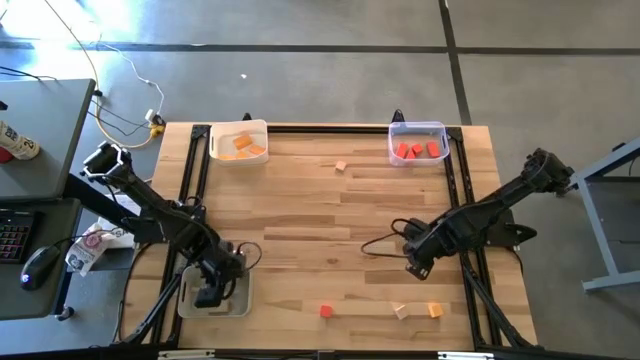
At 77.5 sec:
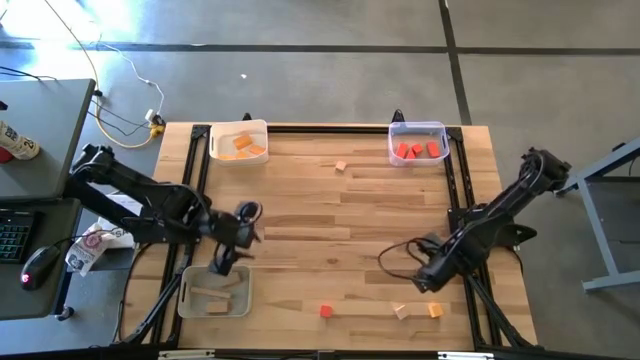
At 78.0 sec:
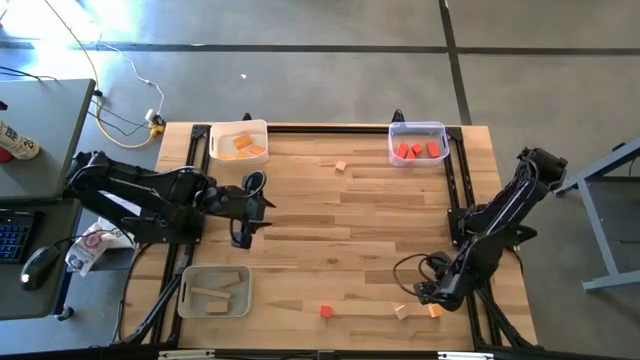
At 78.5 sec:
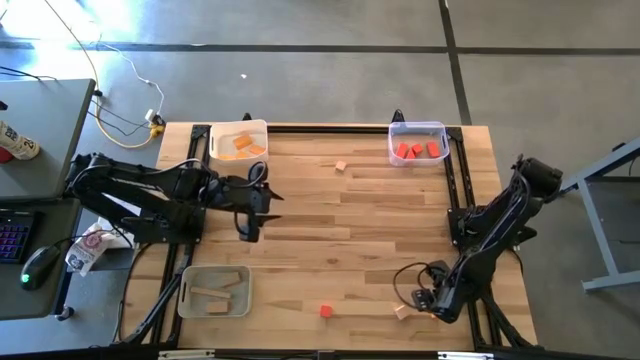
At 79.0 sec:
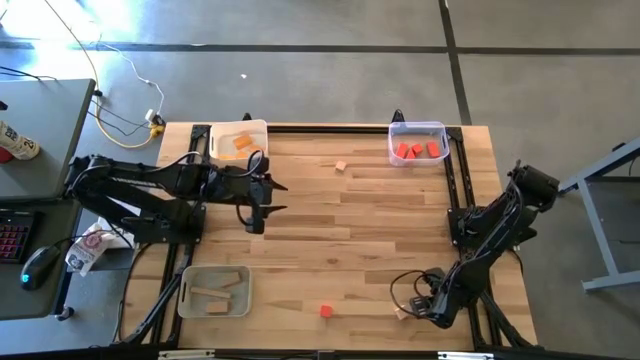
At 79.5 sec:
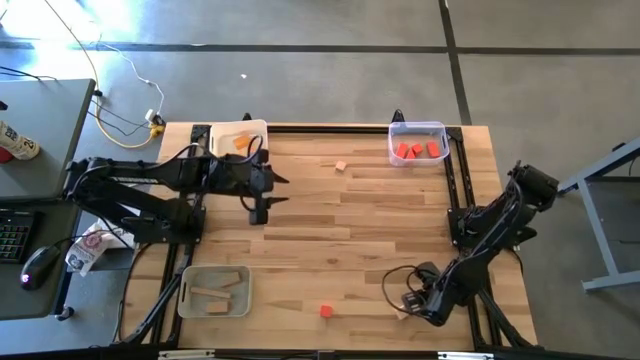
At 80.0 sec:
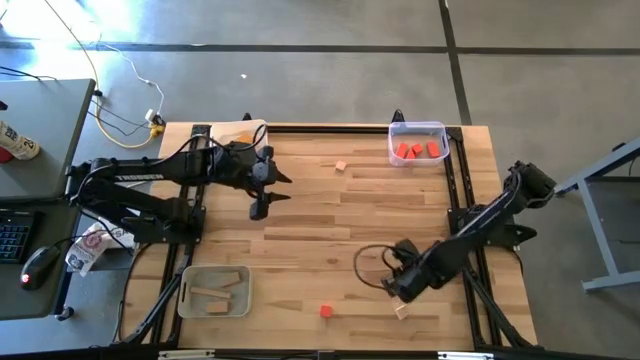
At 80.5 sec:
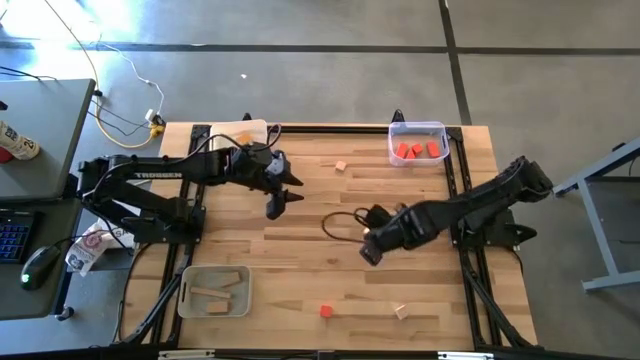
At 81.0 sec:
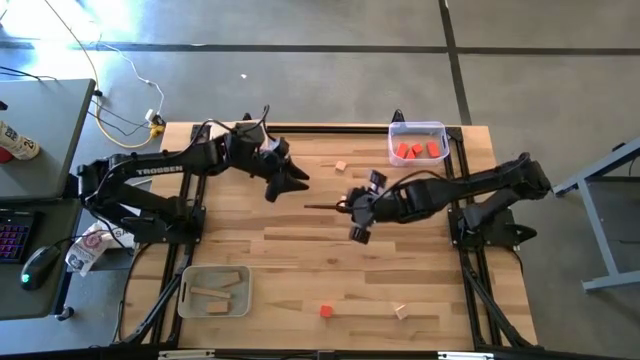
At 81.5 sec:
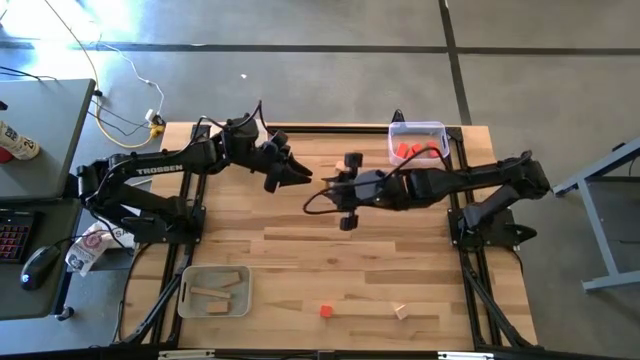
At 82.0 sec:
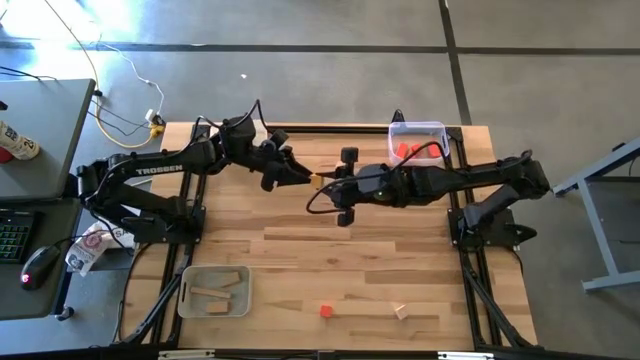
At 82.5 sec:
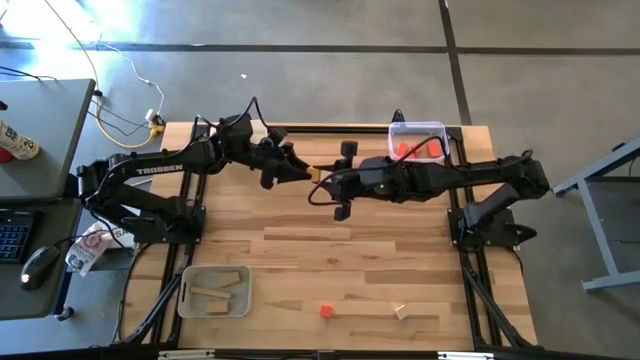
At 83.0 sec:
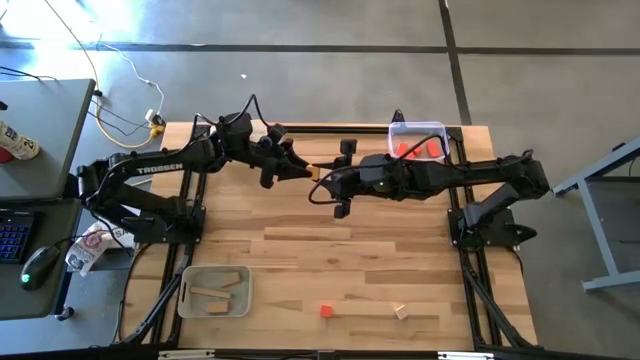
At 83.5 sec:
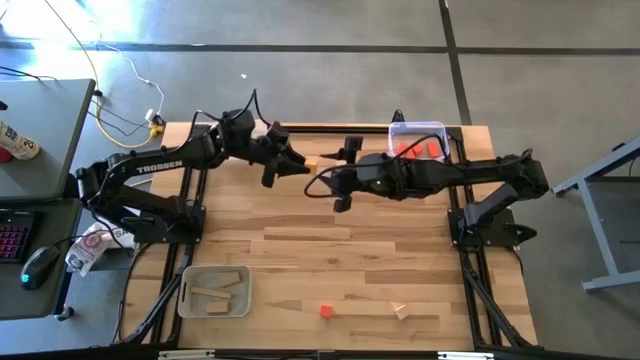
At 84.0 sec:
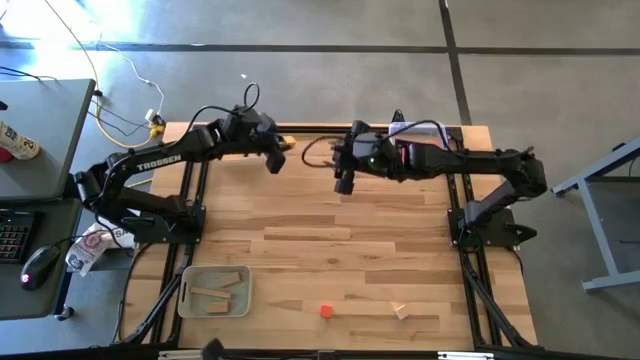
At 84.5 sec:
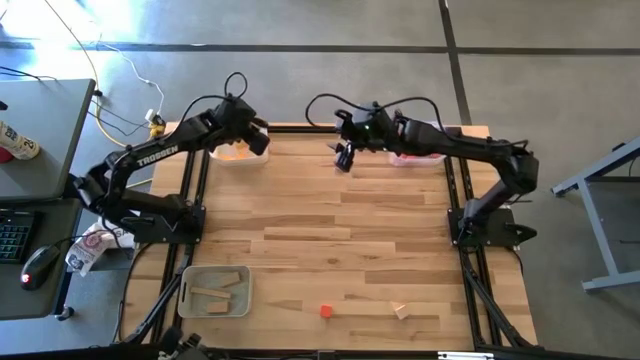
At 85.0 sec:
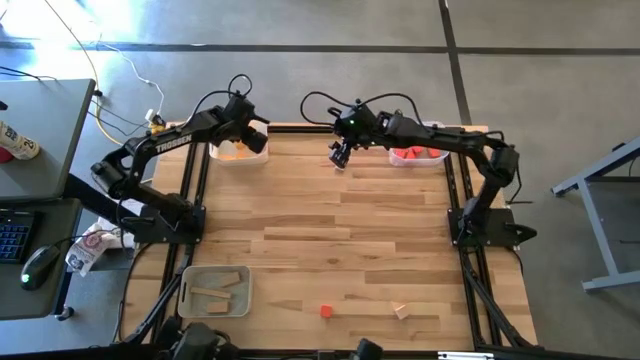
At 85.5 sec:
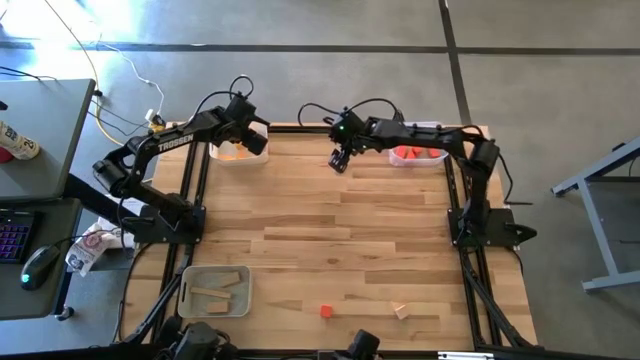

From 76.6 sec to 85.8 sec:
Task: Sort & place blocks by color
Put the yellow block into the white bin

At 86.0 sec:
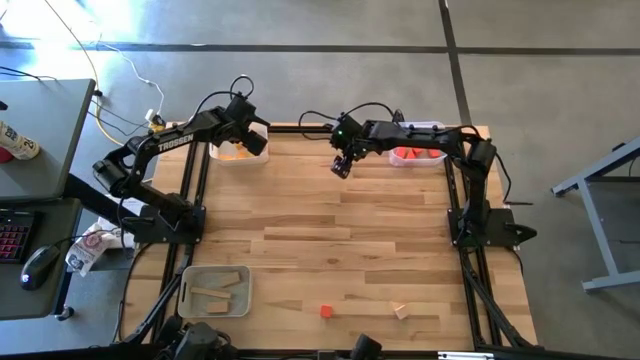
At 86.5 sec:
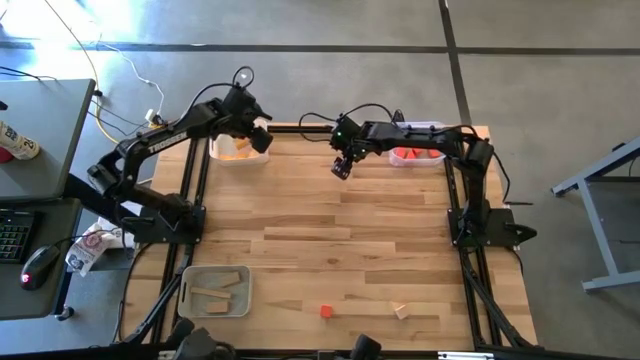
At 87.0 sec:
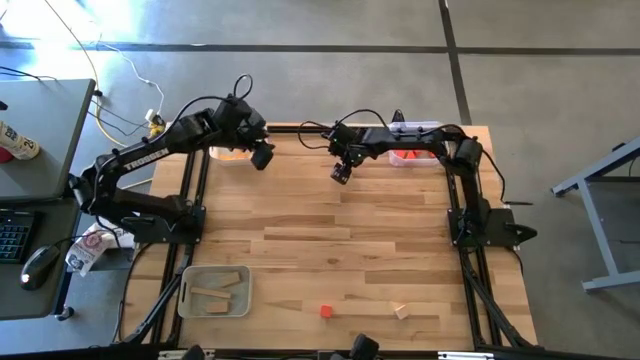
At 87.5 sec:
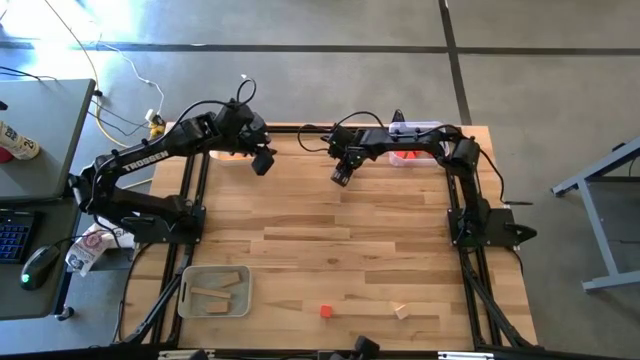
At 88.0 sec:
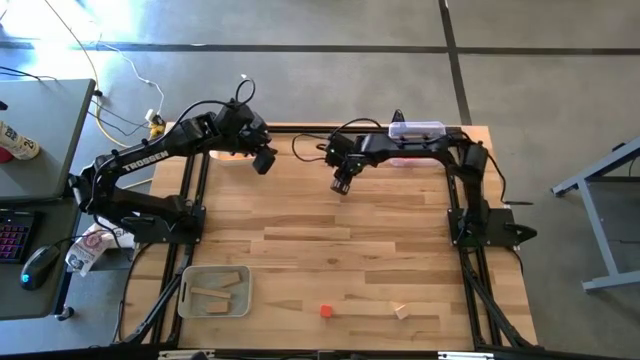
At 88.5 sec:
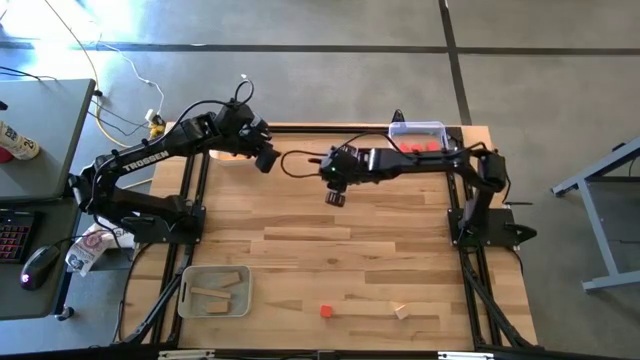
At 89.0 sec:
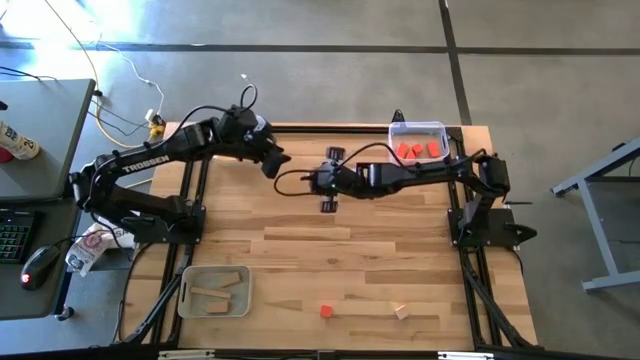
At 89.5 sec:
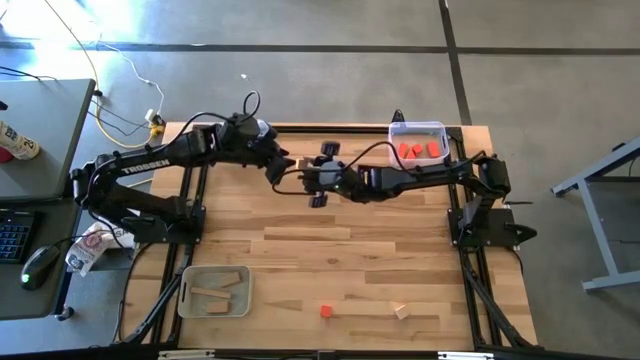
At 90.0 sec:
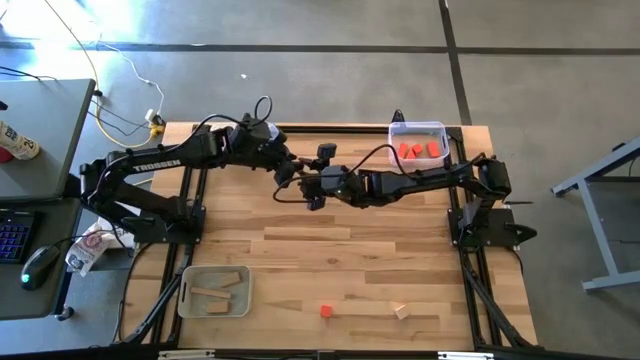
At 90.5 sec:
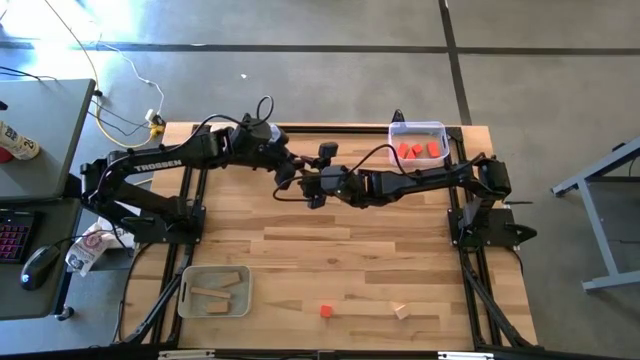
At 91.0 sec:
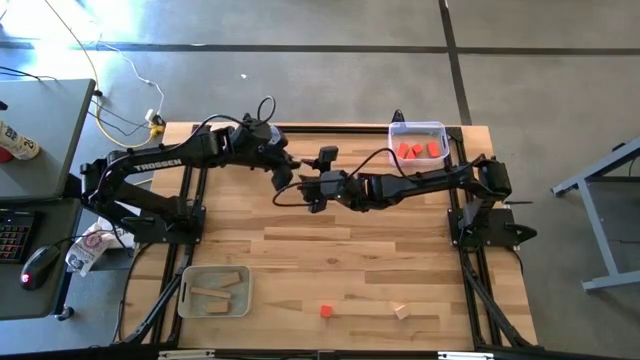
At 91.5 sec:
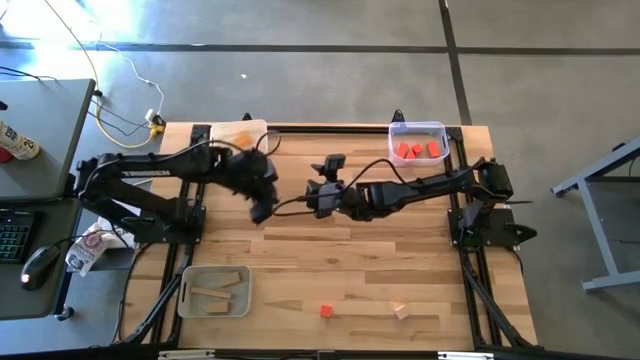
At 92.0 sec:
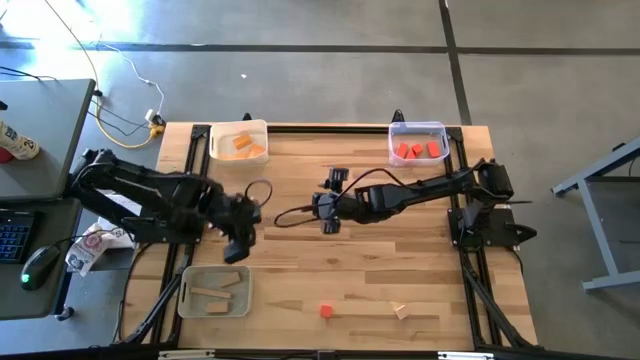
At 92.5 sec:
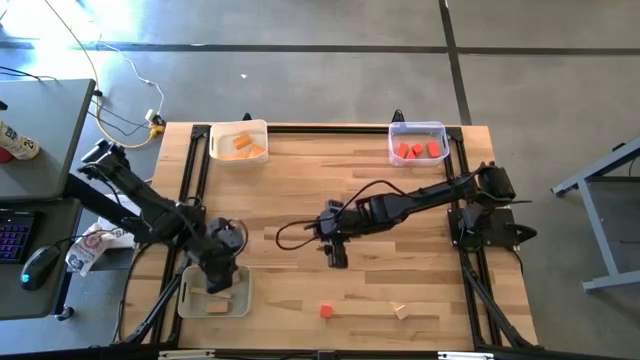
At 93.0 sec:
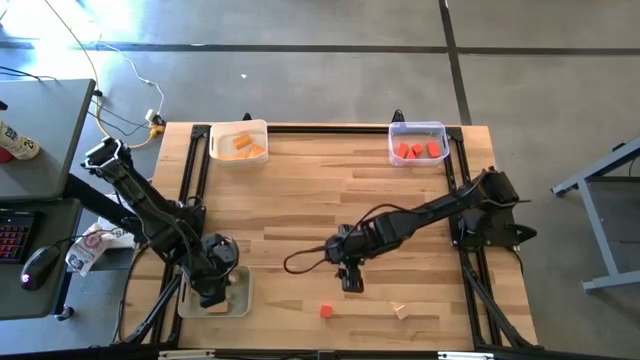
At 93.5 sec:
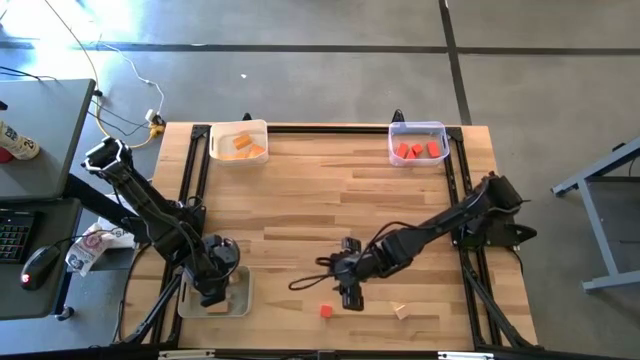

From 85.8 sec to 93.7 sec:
Put the brown block into the gray bin

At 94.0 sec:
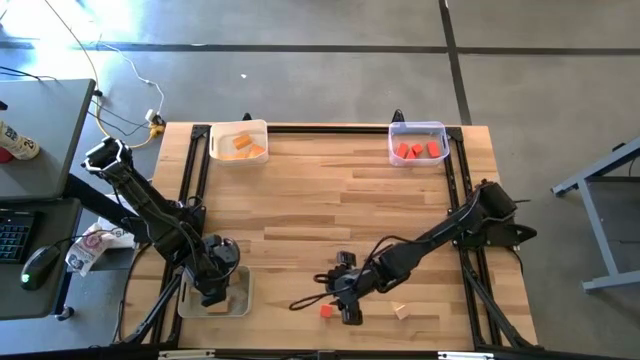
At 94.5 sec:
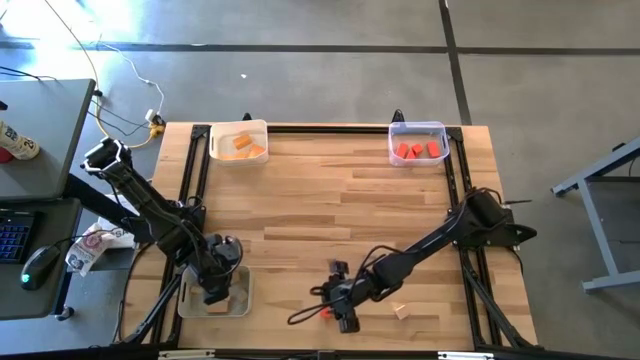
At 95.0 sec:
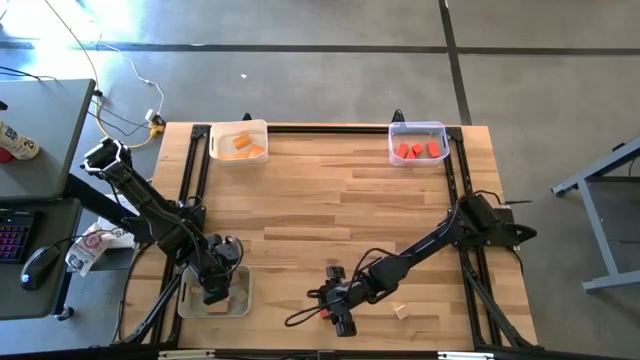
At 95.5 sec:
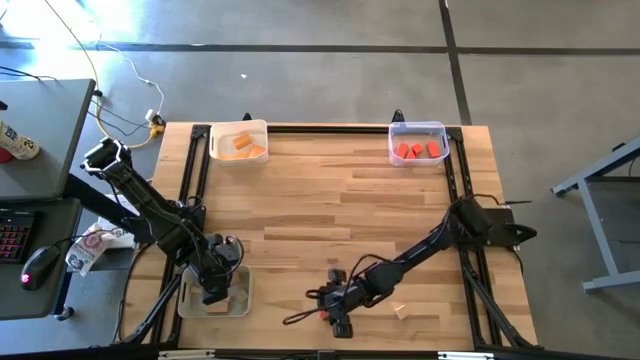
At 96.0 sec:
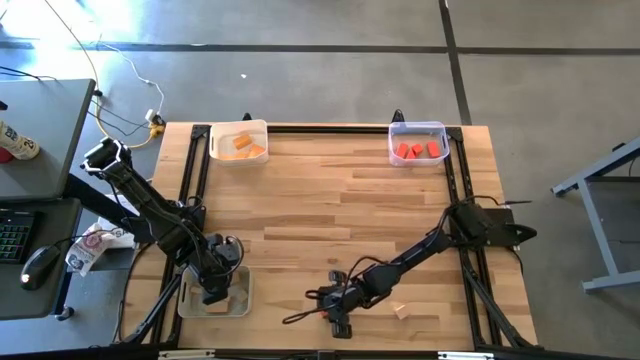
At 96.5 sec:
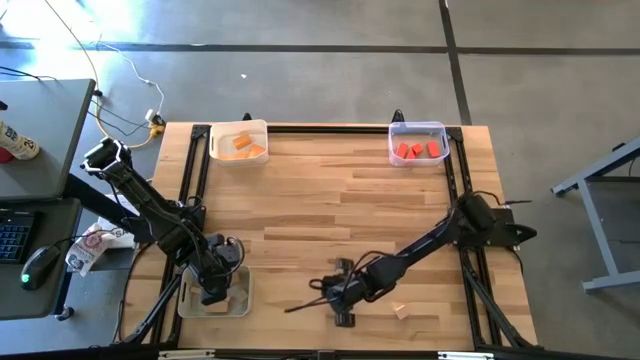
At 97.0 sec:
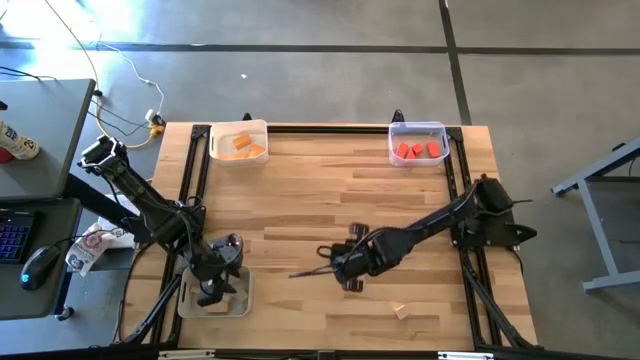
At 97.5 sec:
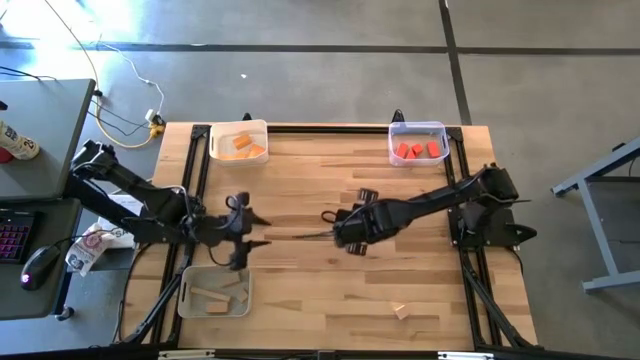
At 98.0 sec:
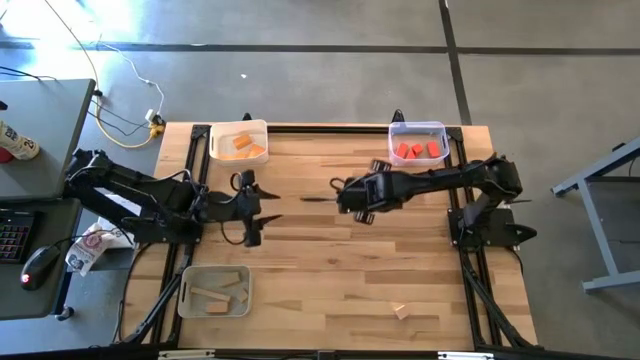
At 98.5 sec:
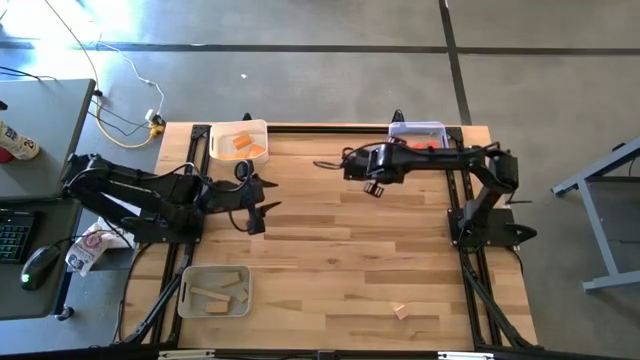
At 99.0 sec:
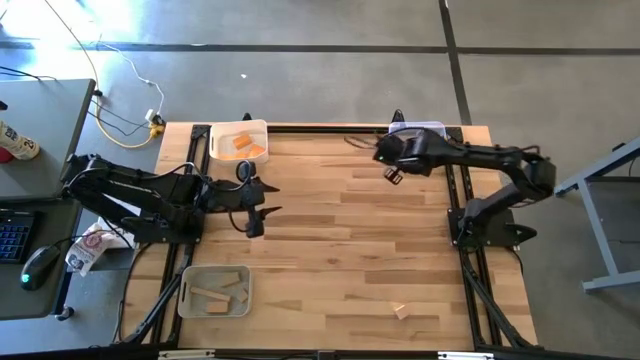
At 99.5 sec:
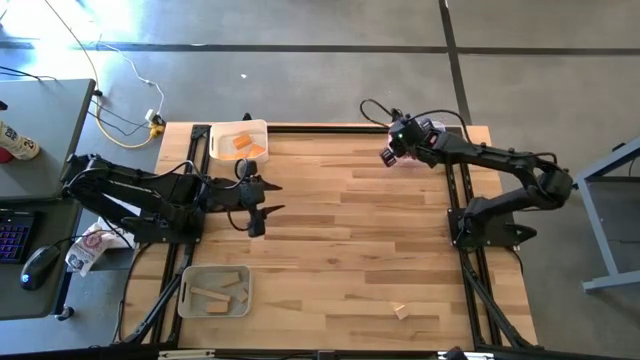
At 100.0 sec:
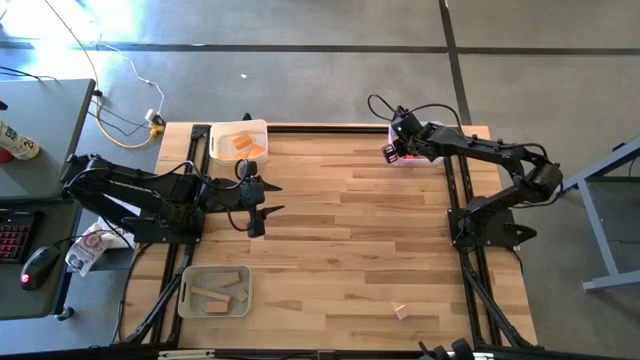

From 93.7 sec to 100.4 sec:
Put the orange block into the transparent bin
